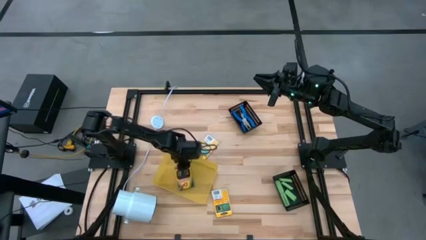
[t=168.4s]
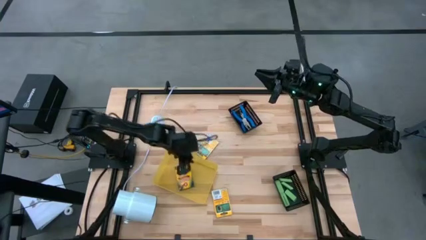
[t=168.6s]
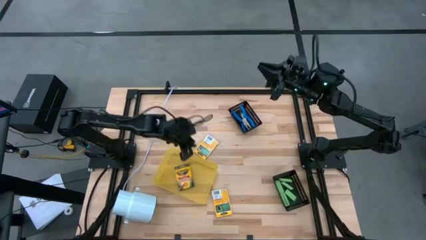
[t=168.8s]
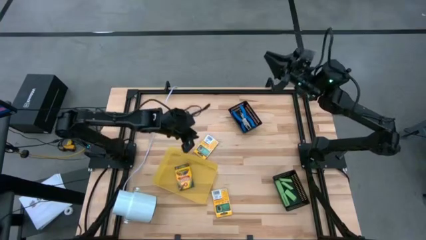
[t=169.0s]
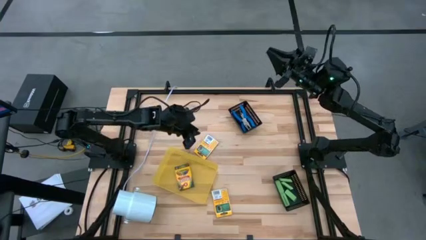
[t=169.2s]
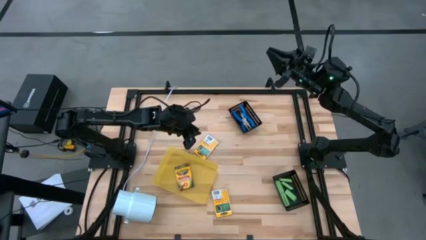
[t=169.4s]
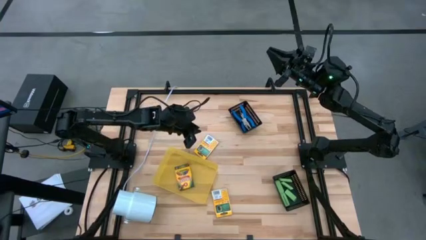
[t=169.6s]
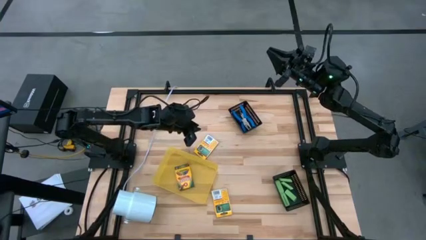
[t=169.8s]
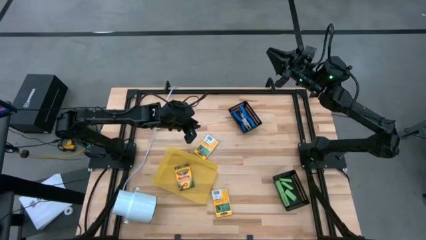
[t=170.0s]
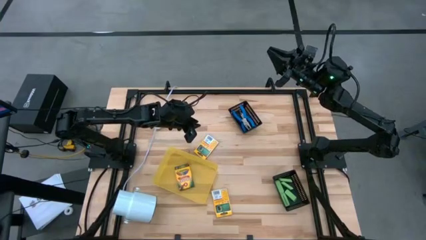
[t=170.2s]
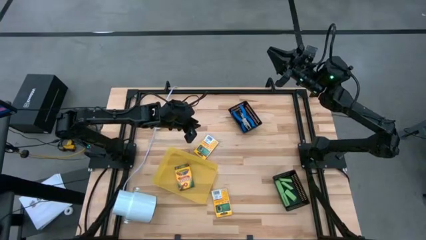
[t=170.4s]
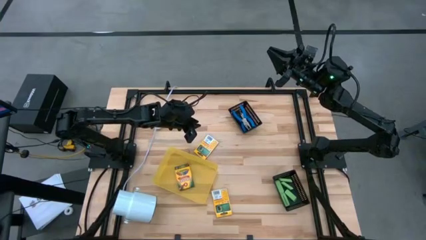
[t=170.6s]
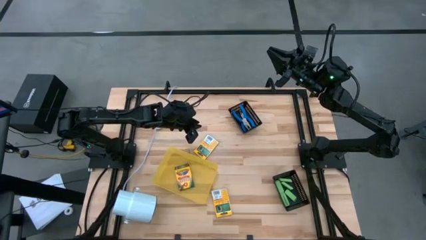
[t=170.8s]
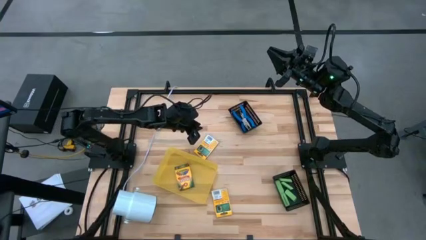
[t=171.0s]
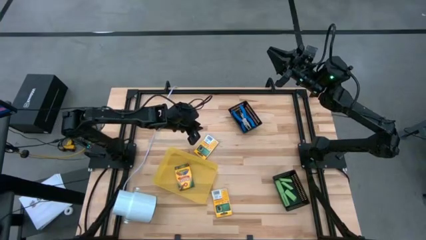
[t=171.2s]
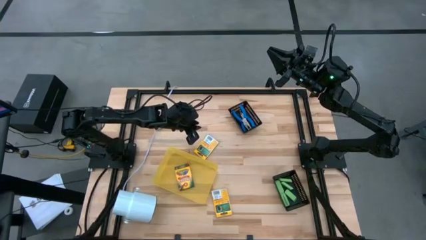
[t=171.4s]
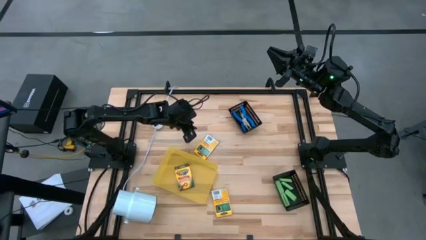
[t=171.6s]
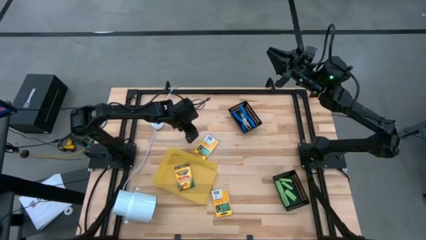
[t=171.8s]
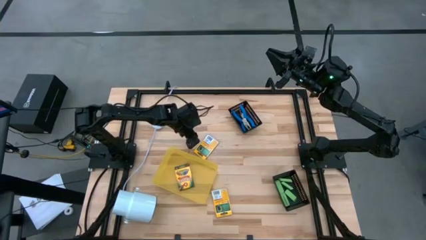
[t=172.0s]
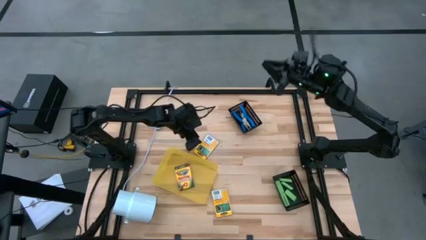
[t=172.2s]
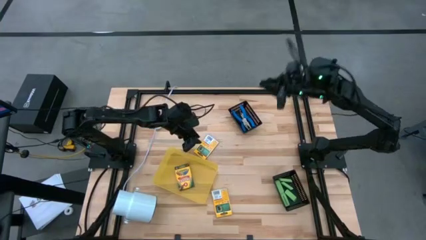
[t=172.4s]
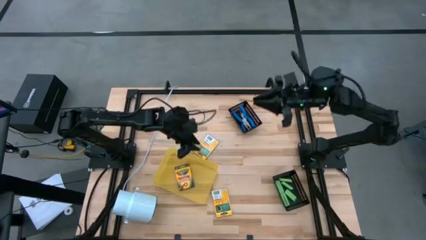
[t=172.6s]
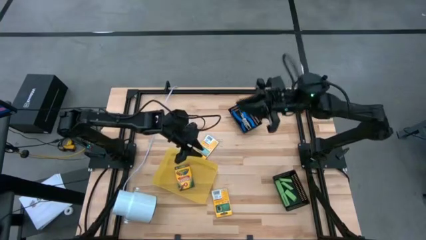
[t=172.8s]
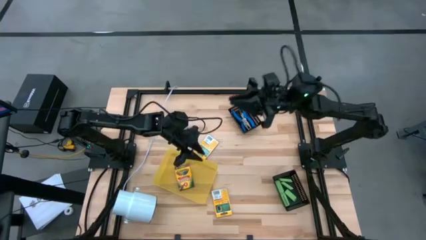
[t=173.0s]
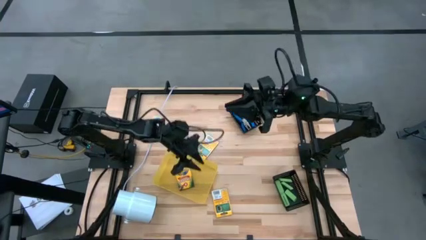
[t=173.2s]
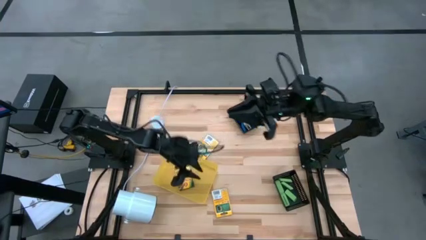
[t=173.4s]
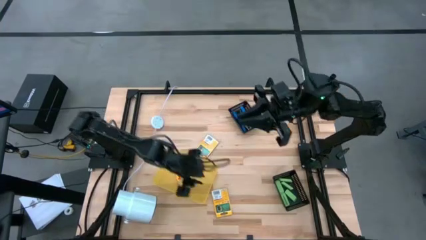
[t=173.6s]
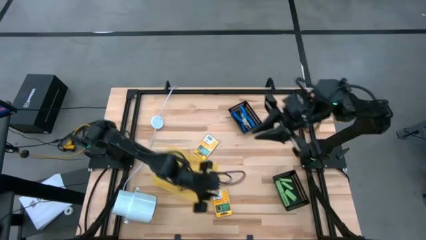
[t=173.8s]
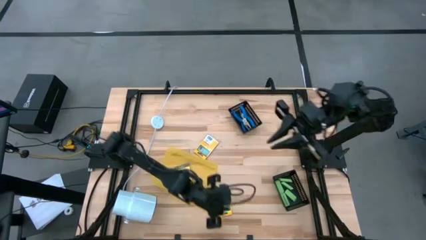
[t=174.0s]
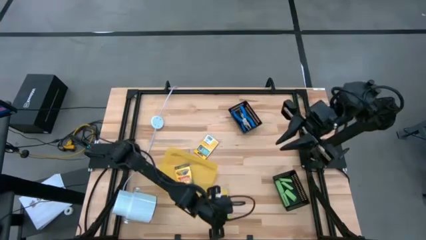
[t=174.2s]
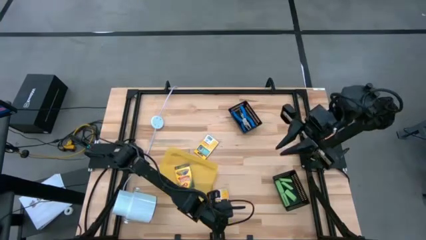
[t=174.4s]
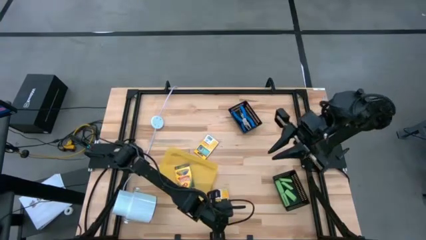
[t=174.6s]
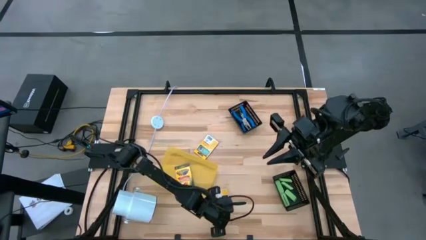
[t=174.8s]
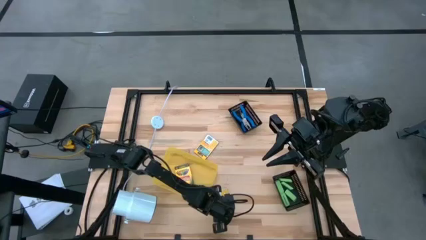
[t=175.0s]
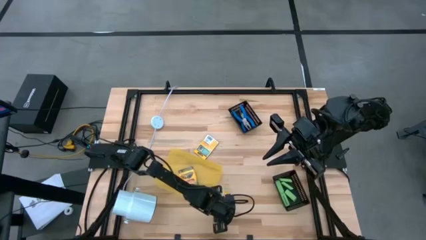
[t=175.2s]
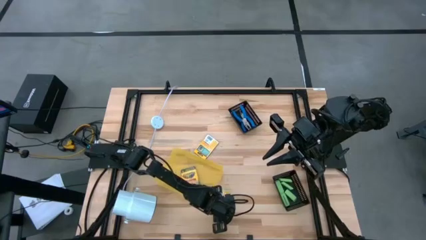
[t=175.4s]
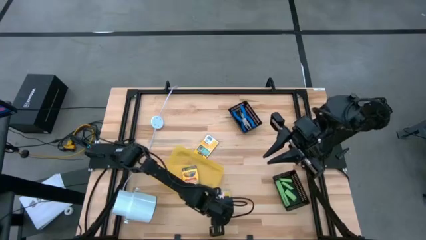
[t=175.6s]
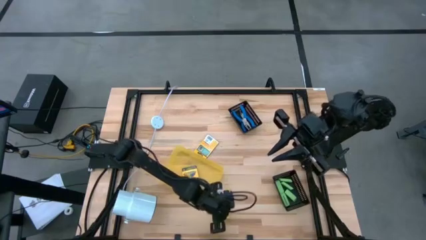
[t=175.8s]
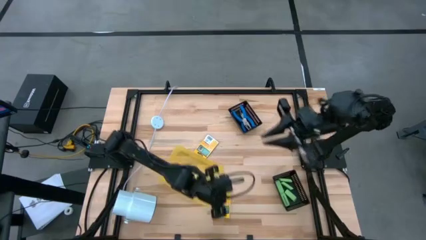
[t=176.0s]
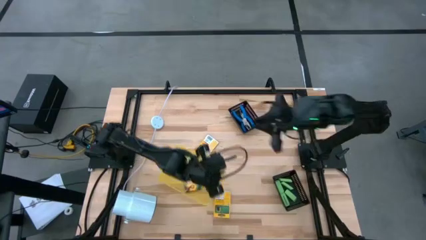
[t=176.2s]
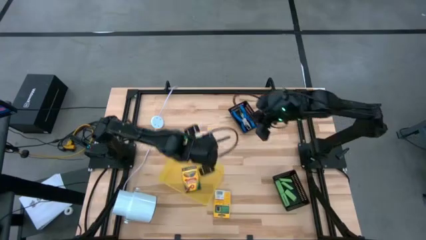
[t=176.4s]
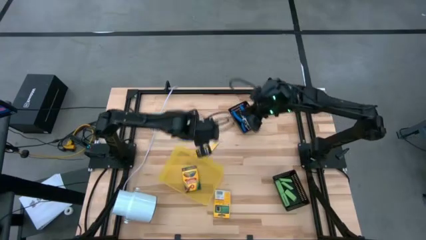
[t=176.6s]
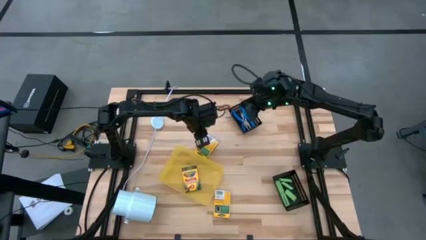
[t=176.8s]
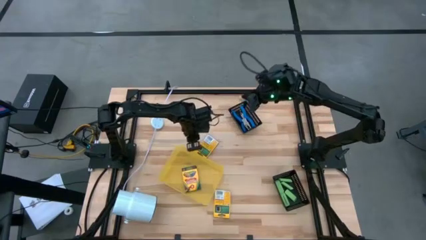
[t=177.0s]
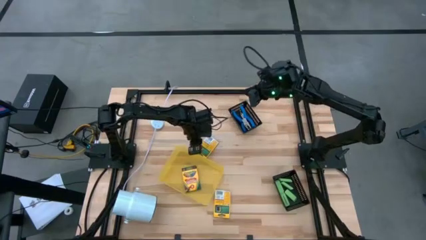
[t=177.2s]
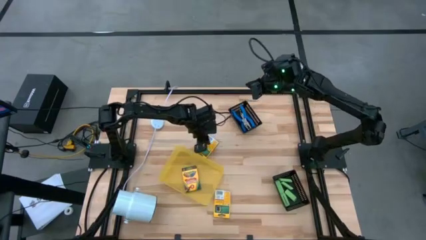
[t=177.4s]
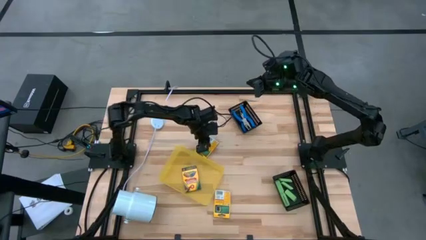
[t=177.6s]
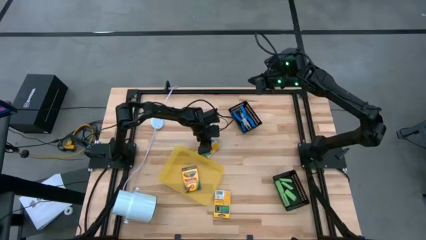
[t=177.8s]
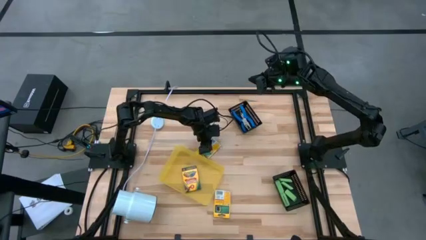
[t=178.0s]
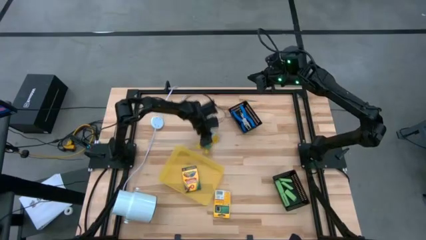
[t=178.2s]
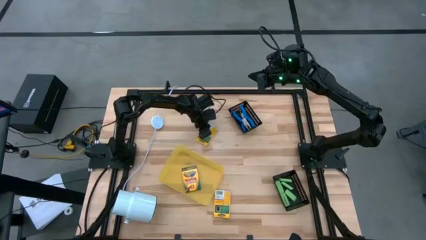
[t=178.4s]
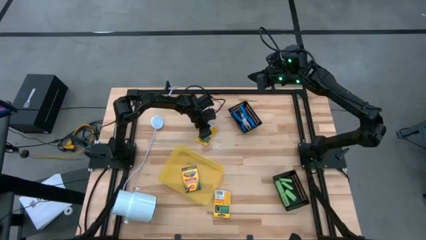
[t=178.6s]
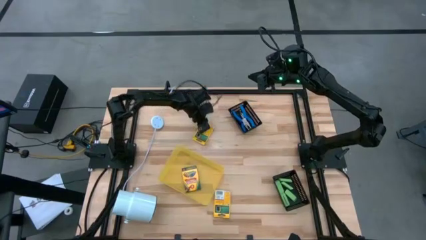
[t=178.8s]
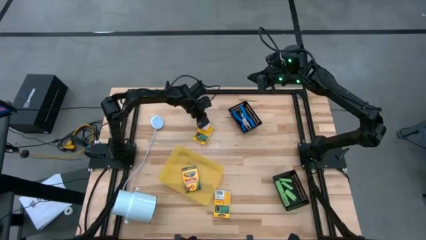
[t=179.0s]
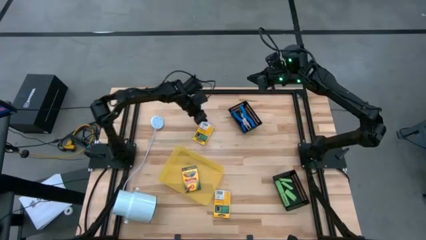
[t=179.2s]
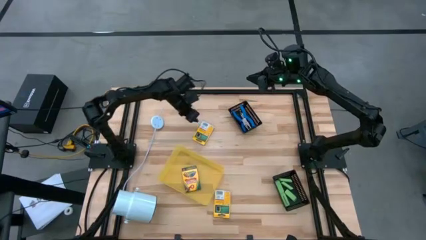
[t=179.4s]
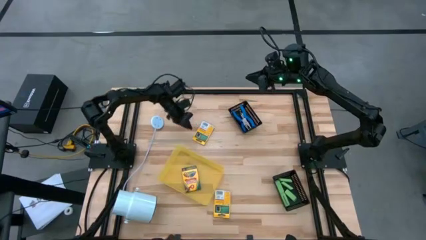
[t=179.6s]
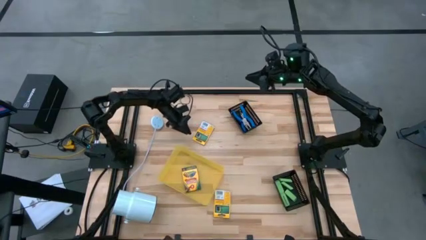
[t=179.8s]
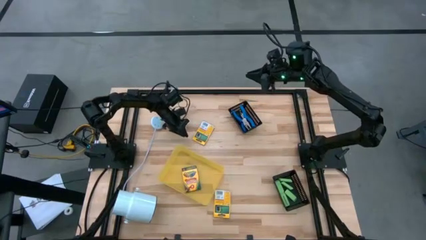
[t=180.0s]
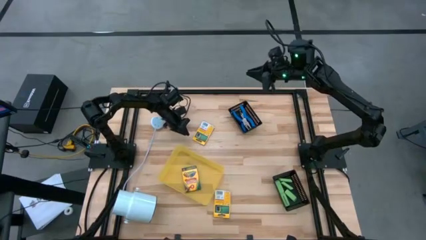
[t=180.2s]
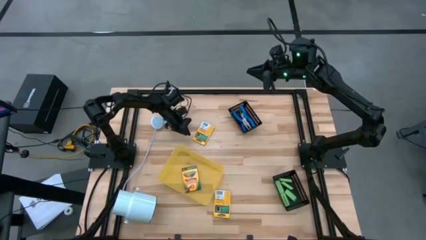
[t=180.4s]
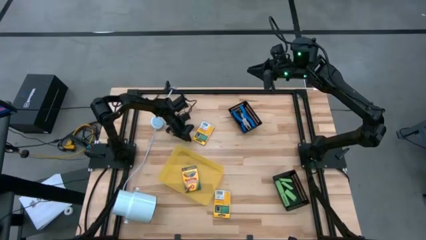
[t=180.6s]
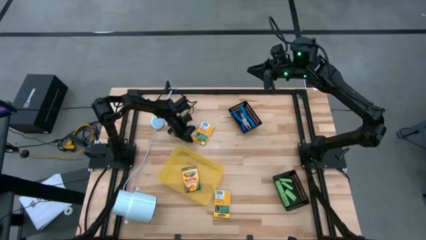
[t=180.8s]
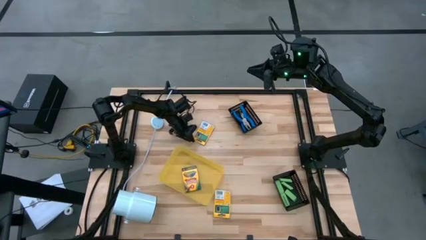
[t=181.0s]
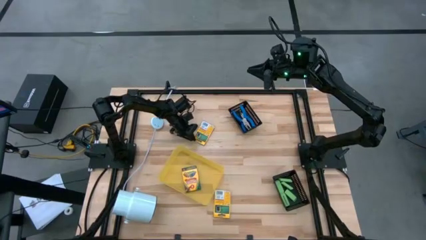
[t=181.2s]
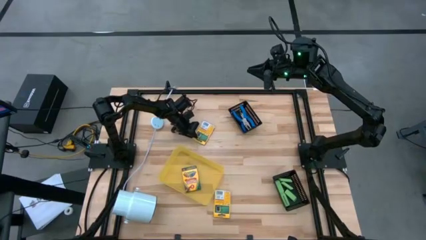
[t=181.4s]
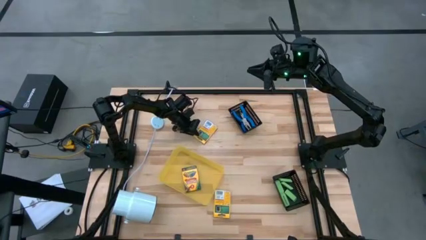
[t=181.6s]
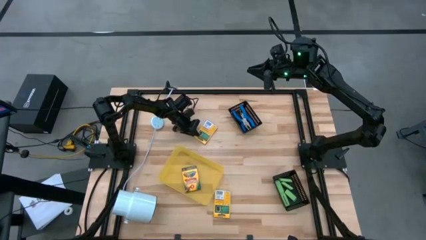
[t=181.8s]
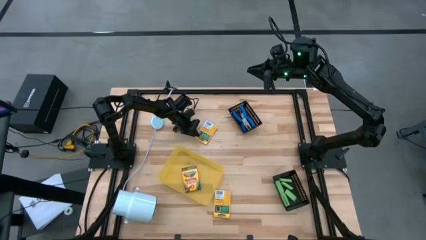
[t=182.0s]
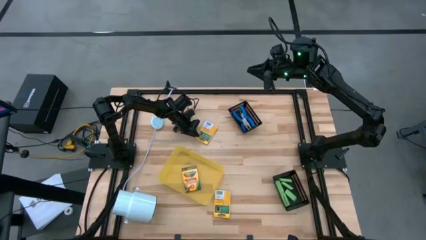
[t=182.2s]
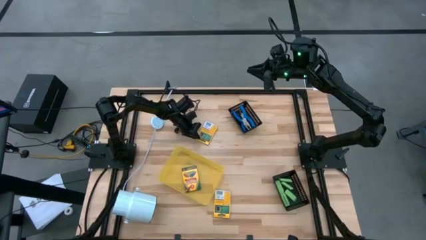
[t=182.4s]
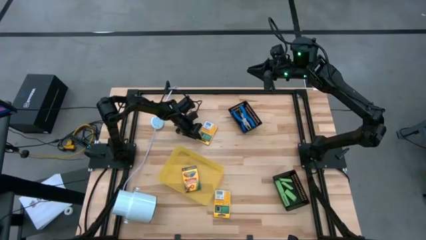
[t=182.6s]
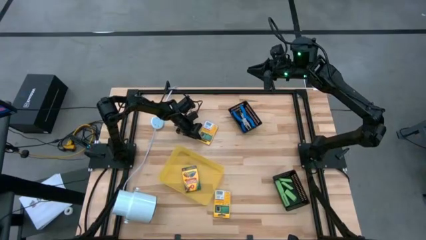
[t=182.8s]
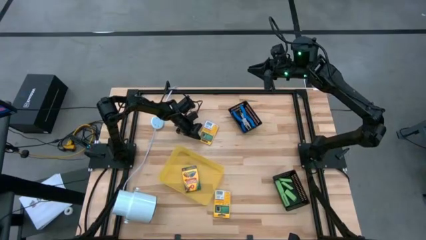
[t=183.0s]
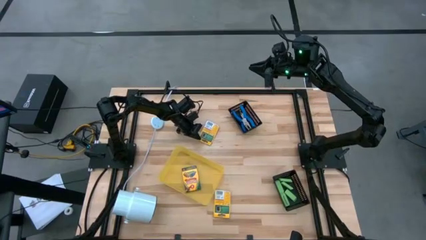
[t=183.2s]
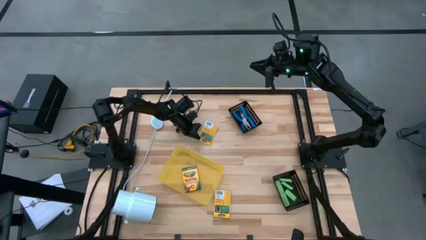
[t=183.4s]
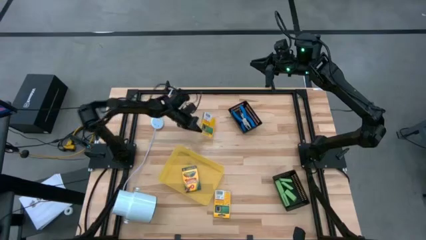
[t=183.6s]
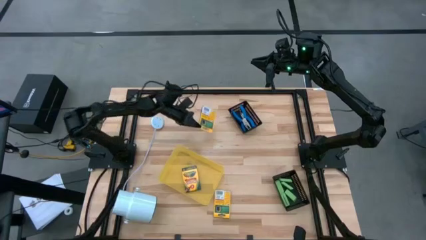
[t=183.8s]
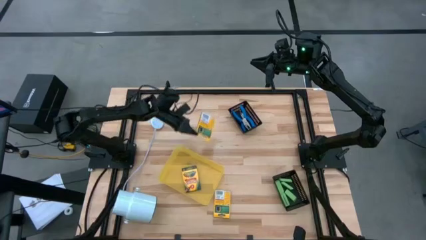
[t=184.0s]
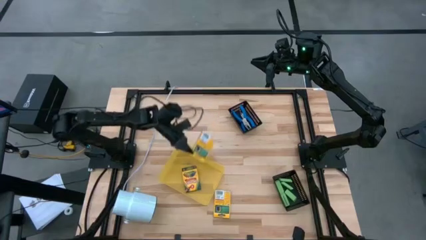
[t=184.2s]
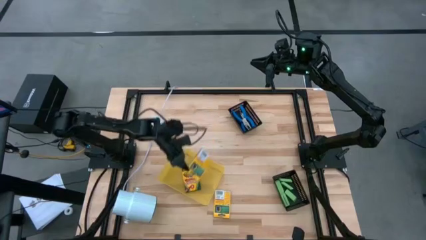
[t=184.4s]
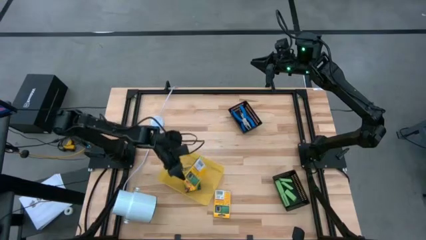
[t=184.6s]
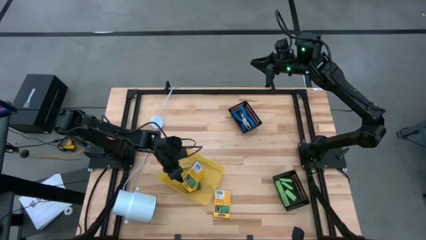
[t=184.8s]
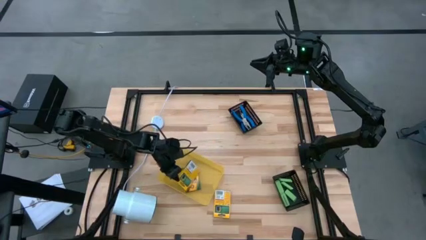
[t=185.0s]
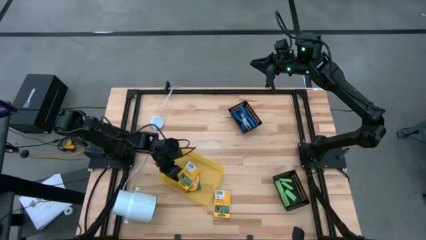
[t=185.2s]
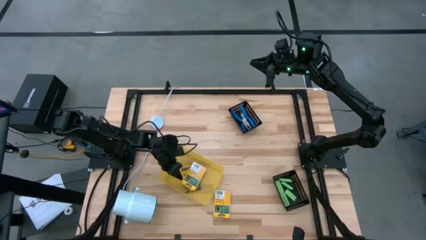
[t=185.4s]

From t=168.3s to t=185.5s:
Task: Pick & Place School Supplies
Put the pack of crayon into the yellow bin
